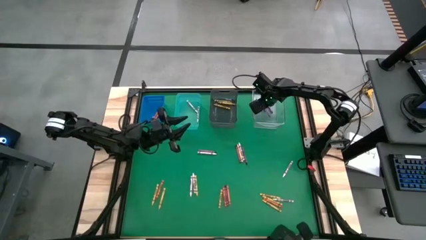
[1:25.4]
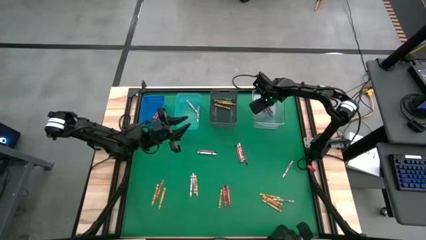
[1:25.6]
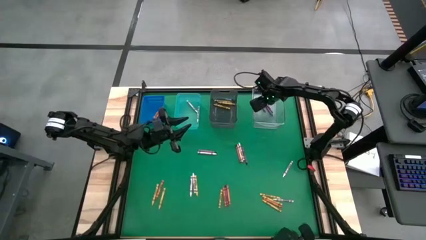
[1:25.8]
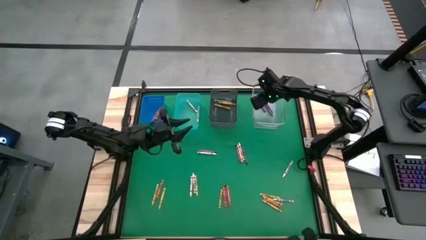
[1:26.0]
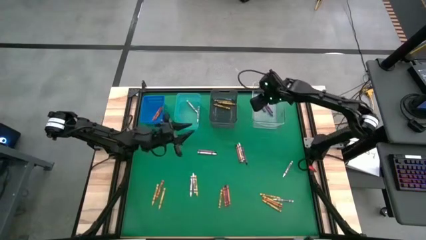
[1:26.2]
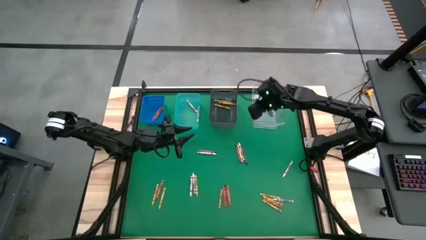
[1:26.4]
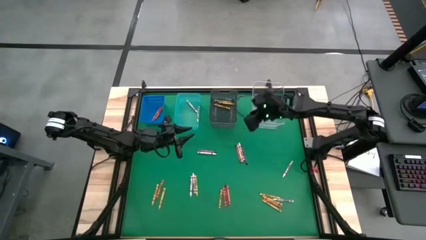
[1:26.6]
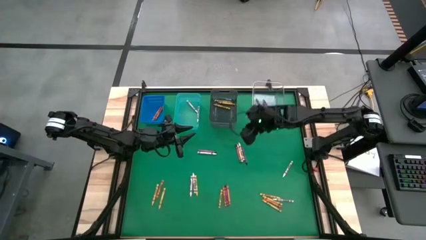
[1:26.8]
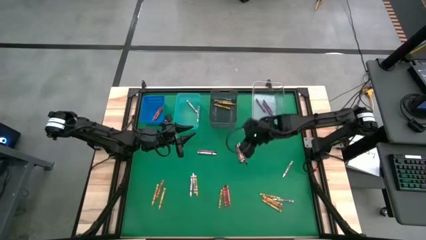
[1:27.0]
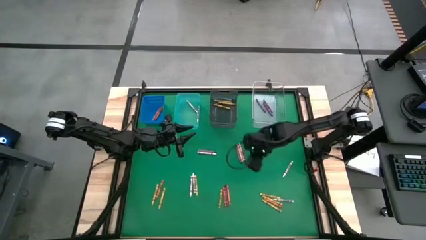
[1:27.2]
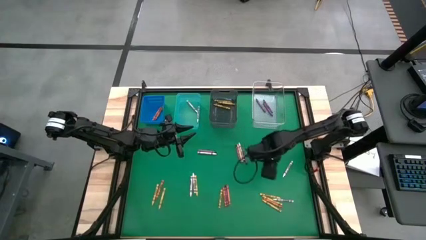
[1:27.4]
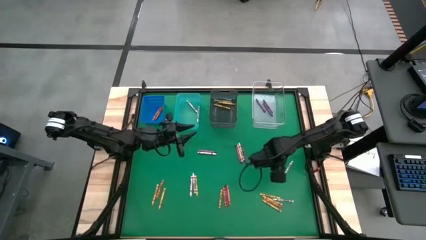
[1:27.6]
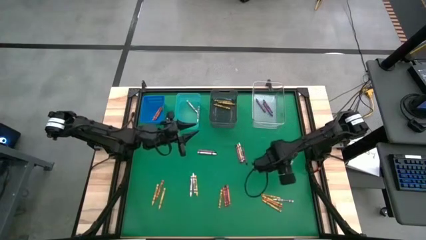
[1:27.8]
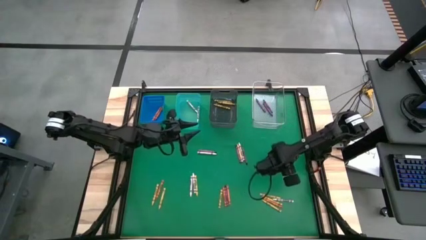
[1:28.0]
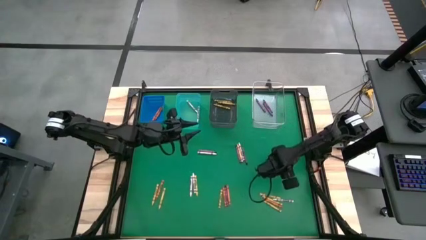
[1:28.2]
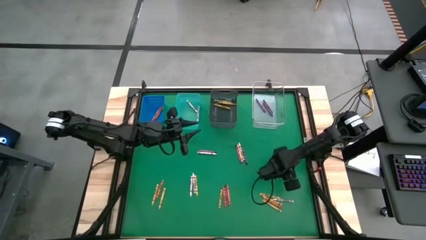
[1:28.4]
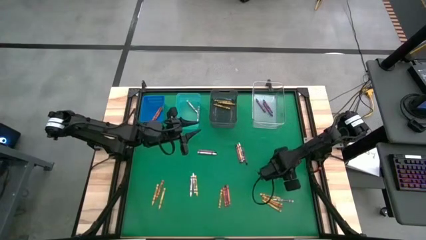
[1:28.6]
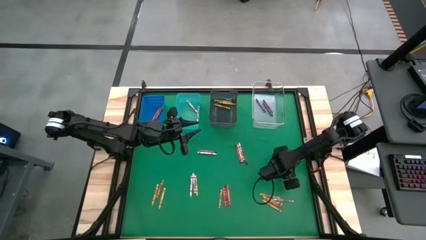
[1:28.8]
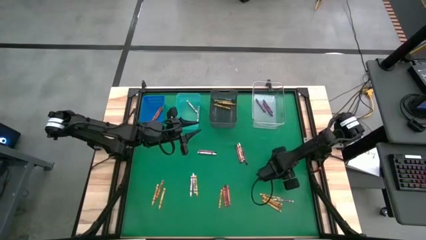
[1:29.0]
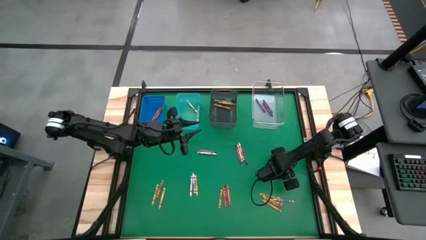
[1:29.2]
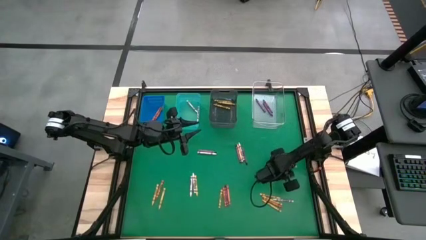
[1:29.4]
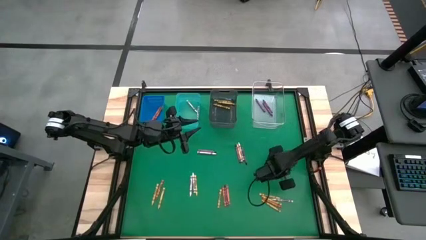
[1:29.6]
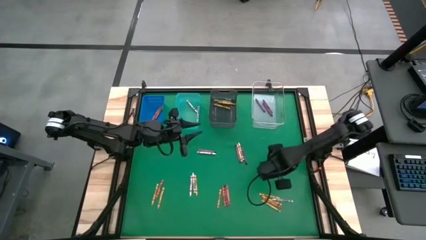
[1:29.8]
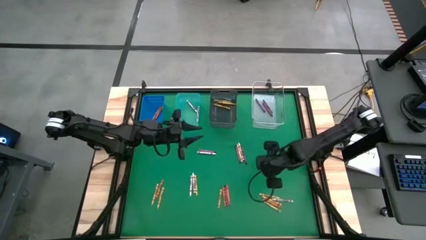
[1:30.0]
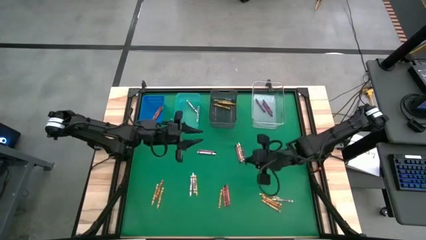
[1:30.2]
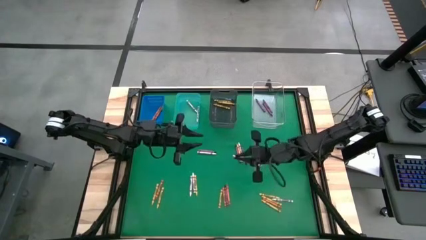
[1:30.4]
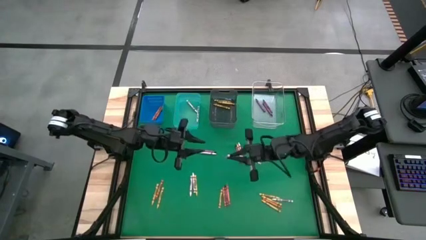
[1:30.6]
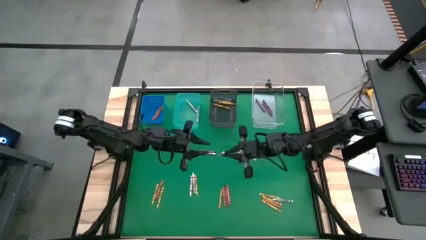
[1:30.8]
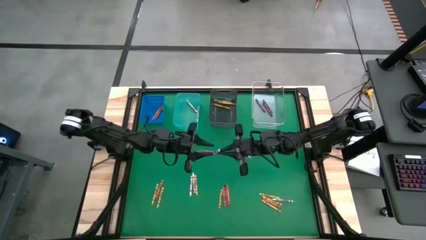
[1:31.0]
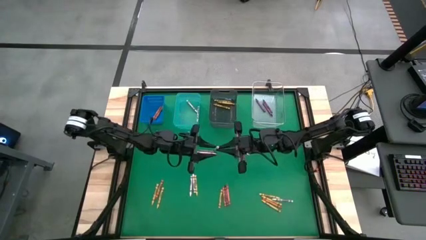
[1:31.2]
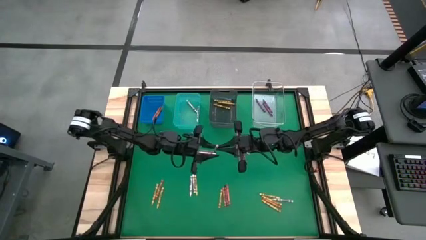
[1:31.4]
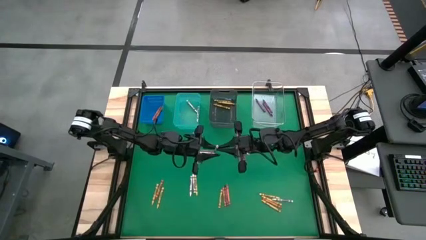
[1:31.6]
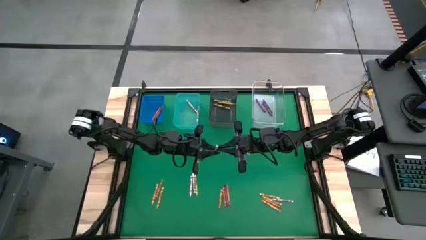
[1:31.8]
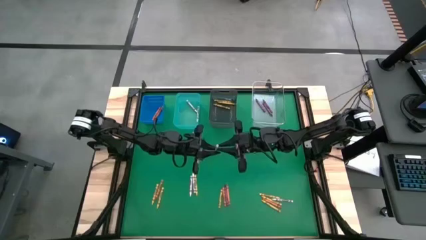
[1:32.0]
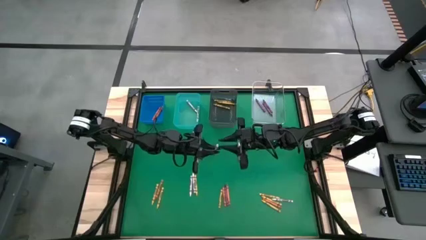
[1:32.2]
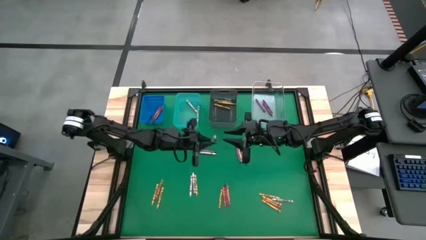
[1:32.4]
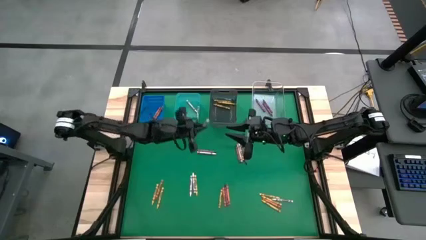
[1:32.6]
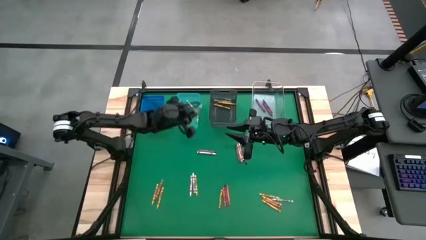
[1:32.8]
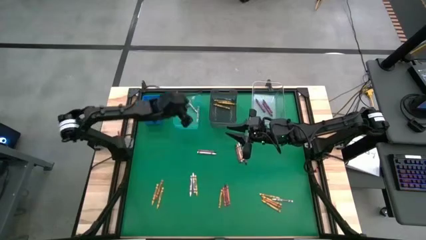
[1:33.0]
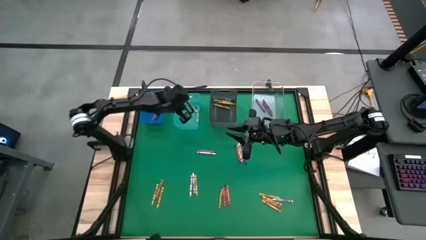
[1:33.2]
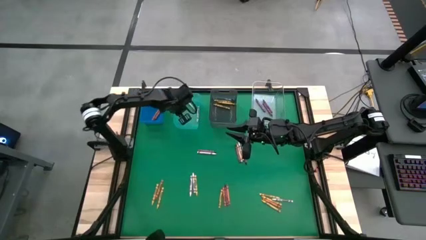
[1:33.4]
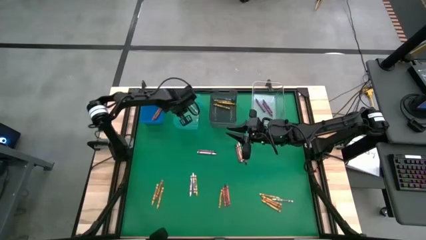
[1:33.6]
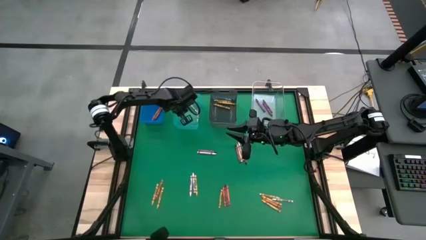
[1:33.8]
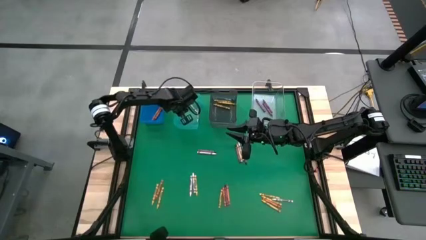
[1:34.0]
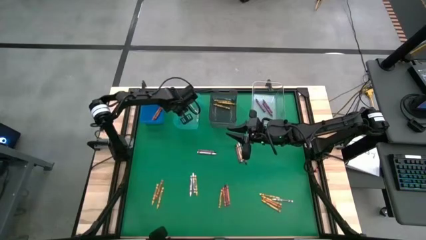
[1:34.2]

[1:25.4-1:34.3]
Task: Sort crayons
Put the white crayon into the light blue bin

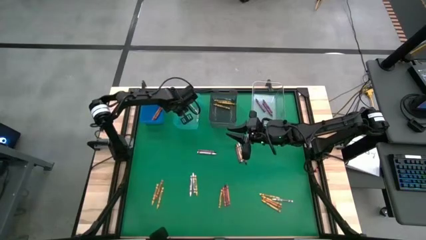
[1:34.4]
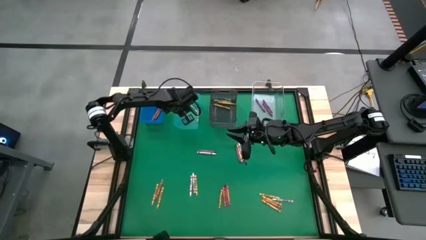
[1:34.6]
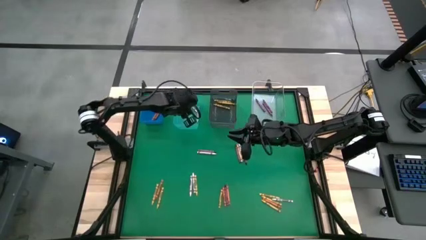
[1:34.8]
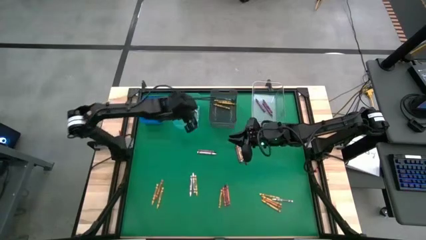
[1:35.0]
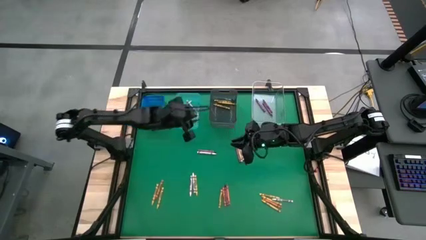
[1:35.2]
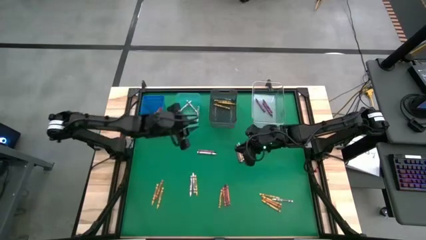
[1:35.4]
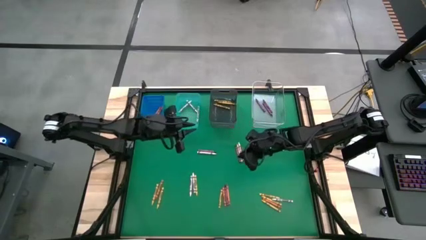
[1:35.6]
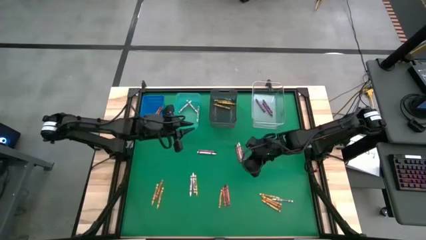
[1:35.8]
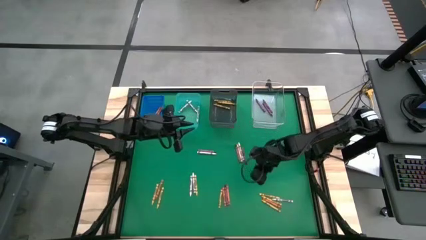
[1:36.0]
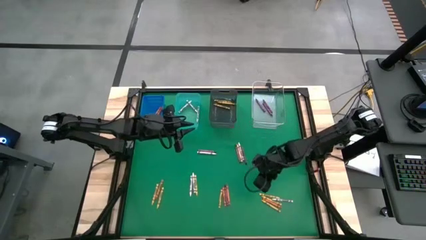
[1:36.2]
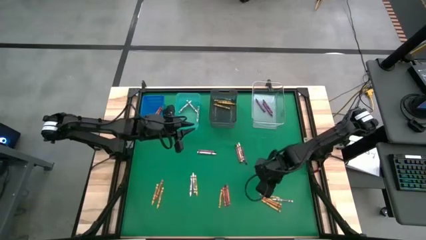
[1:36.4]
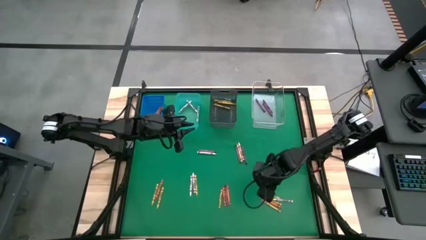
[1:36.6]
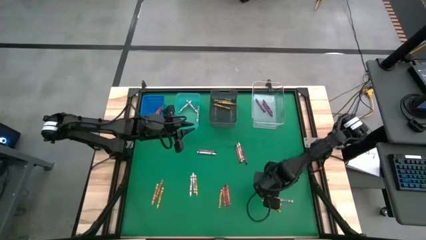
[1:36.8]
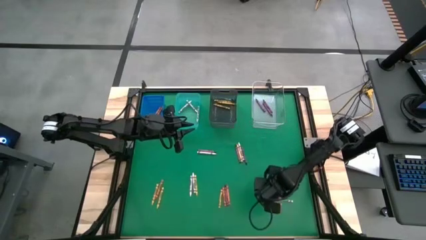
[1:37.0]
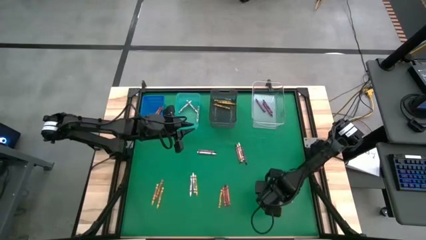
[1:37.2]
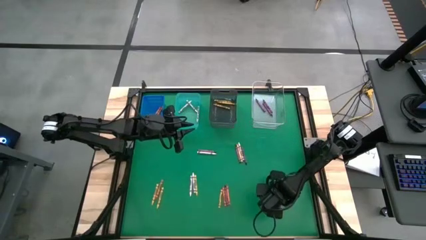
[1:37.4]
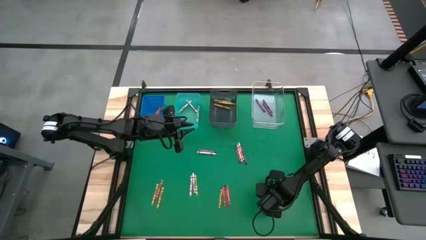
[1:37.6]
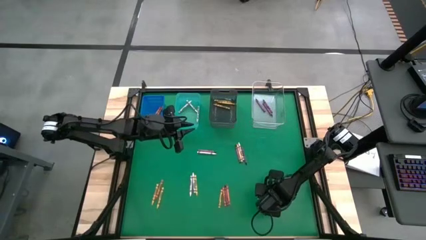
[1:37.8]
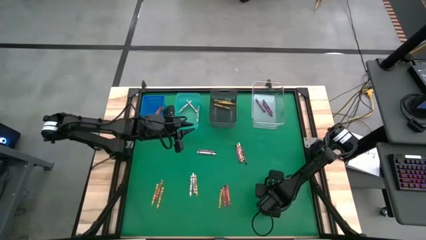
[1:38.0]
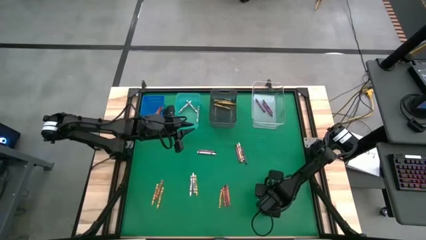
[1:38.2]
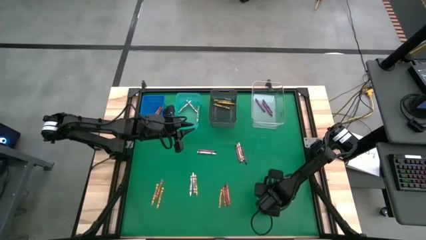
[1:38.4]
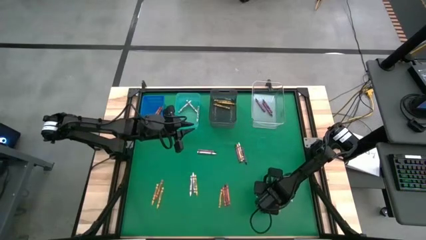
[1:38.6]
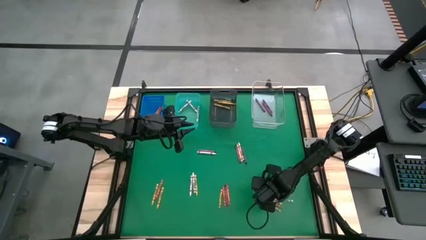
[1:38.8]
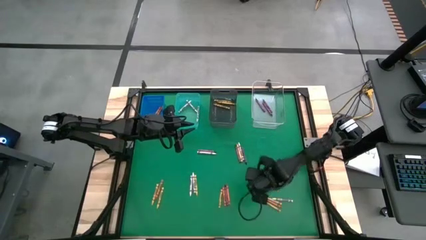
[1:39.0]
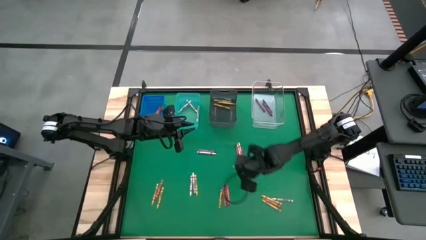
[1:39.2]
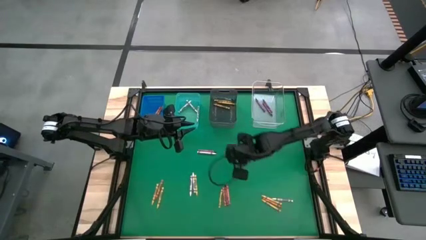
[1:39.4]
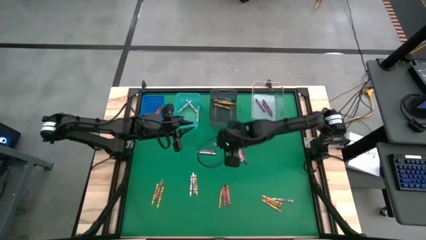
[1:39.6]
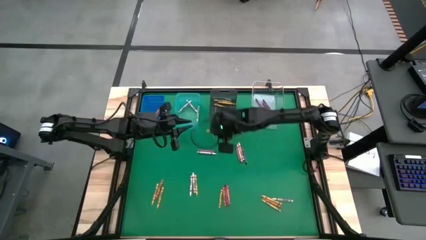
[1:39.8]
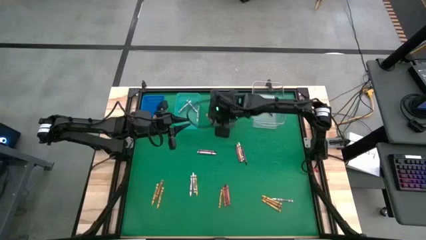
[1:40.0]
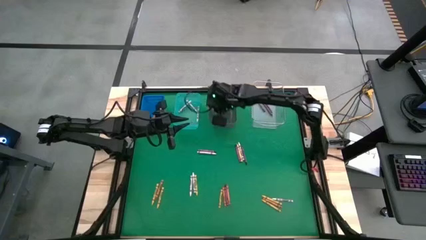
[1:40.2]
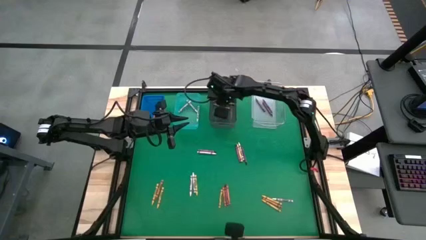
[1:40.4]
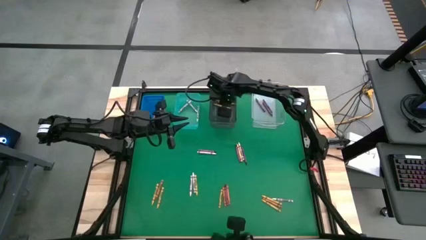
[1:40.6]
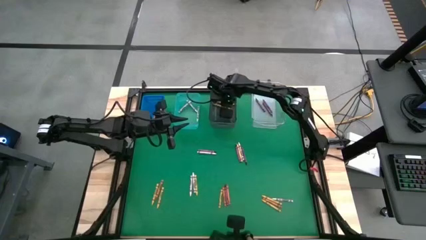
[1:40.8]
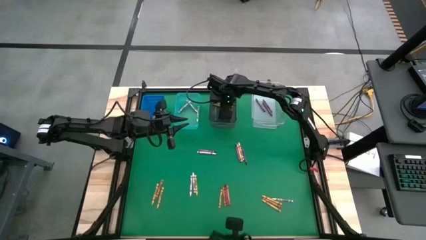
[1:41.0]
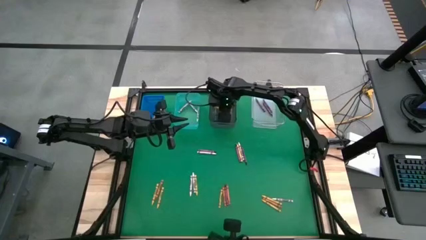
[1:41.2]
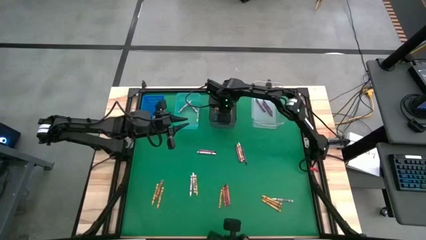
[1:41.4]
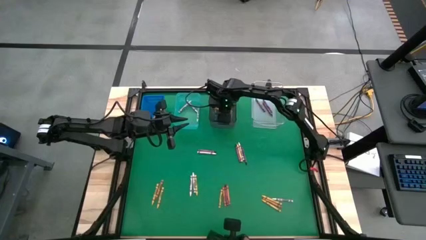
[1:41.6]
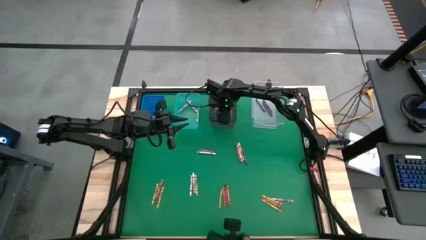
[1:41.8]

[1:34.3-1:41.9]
Put the yellow crayon into the black bin
